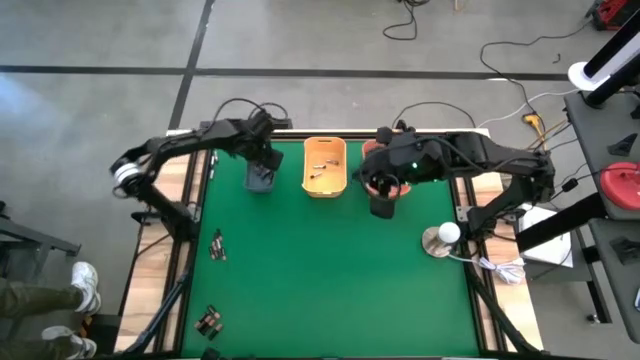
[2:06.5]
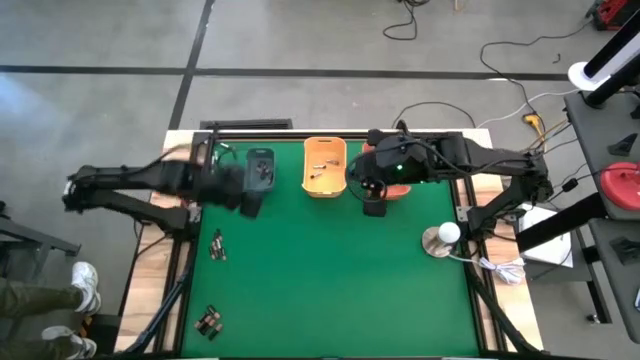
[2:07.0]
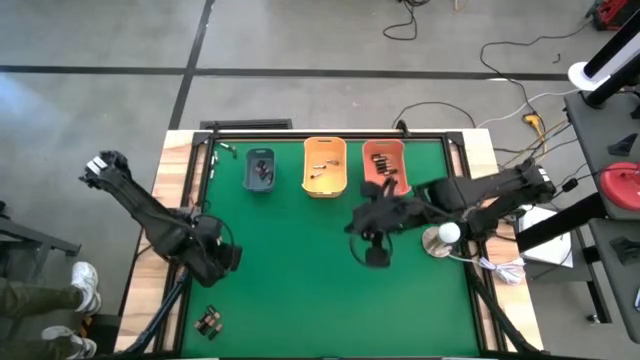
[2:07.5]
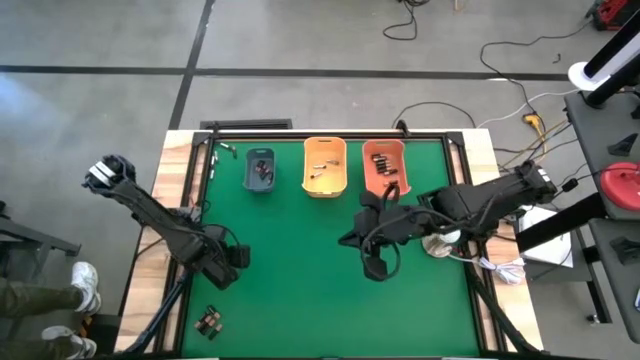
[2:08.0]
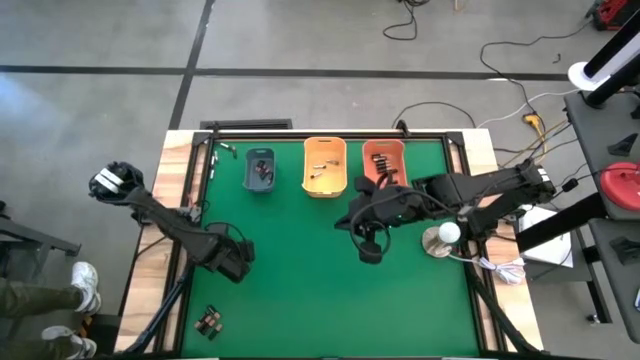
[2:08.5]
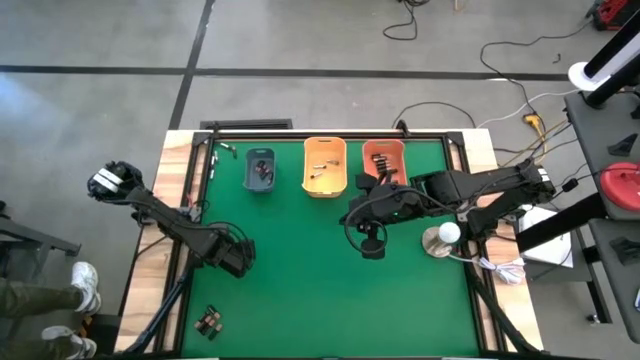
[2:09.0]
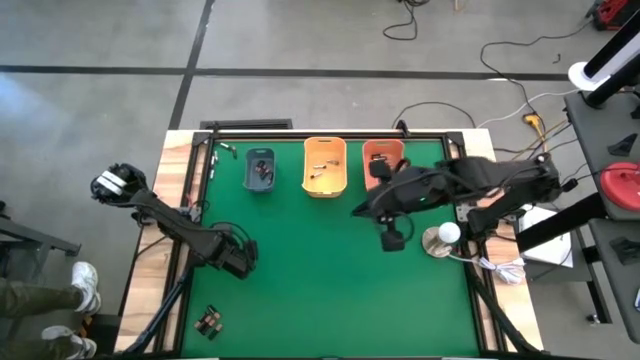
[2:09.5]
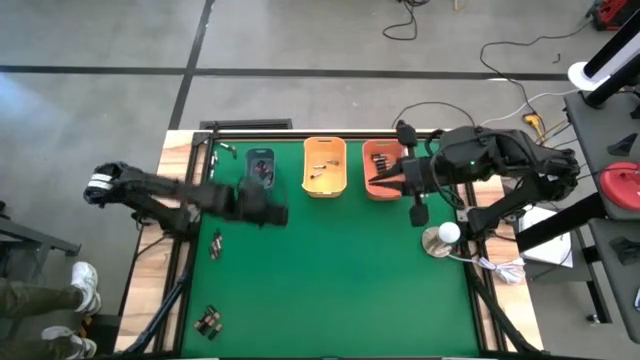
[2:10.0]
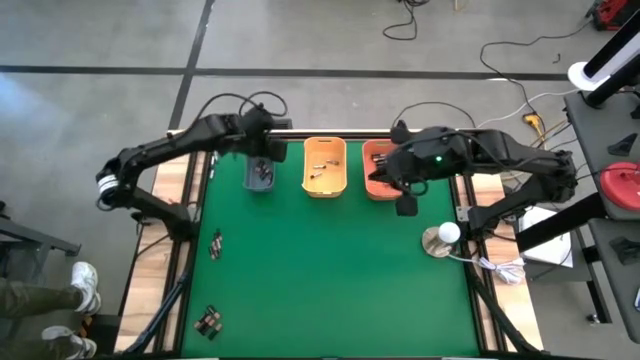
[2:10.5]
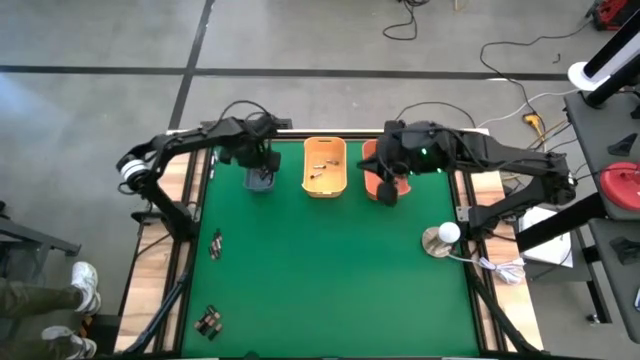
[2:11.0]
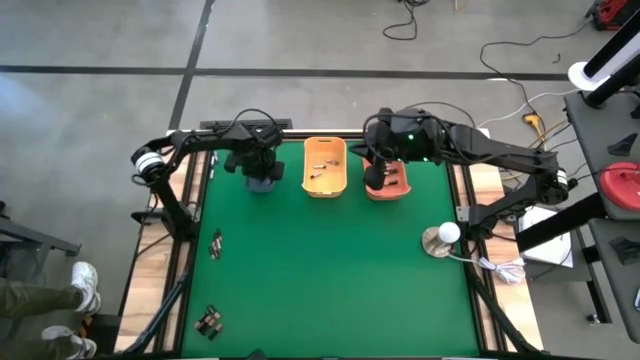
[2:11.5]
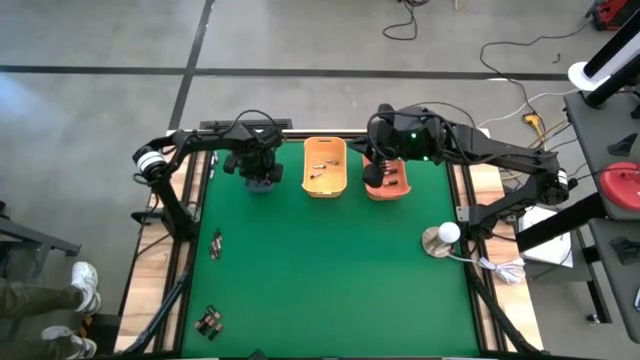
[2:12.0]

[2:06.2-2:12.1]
Task: Sort batteries
Put the black battery into the blue bin

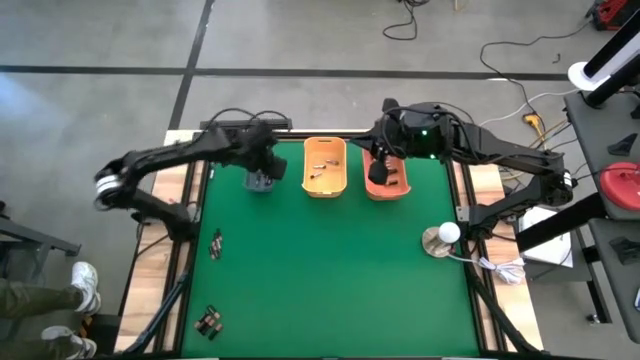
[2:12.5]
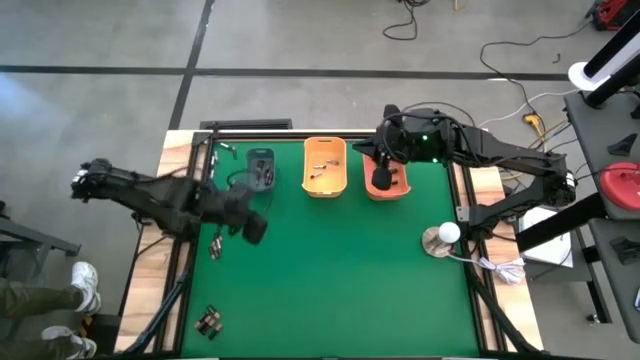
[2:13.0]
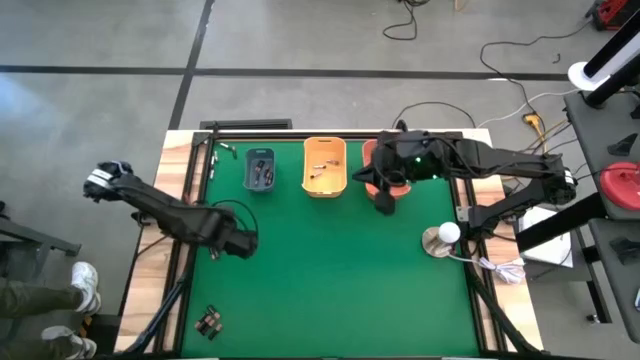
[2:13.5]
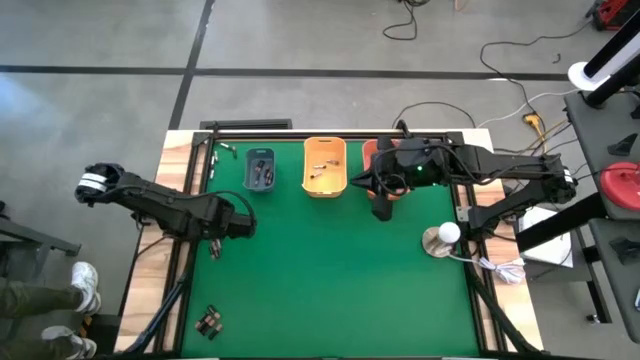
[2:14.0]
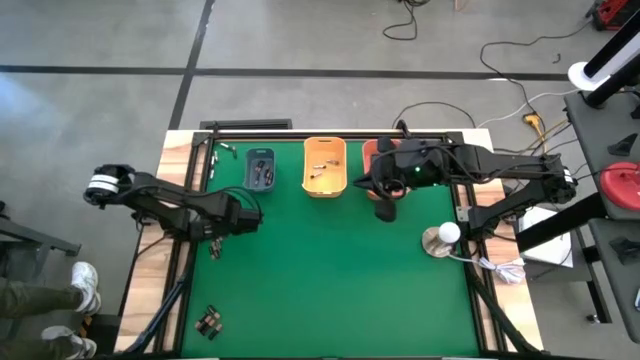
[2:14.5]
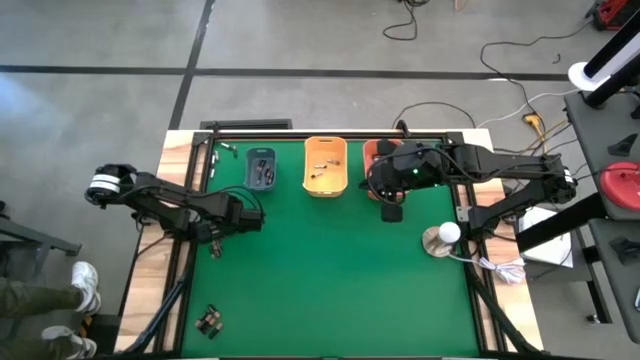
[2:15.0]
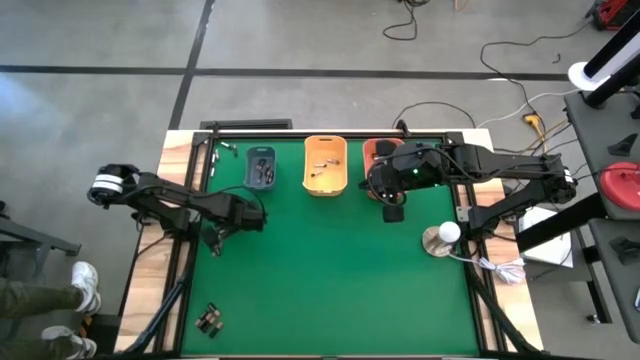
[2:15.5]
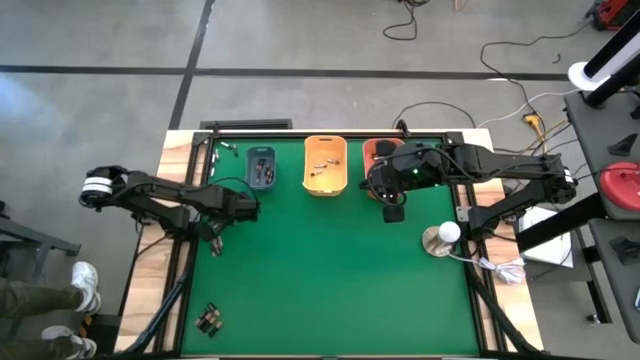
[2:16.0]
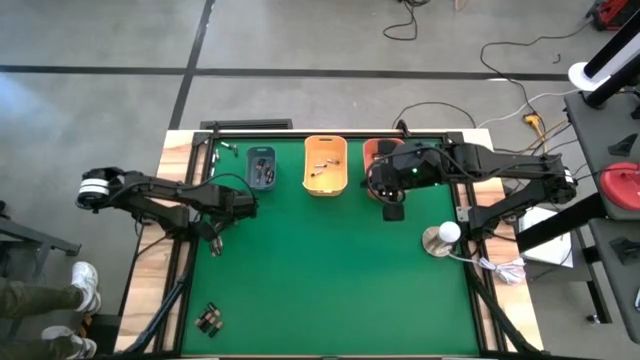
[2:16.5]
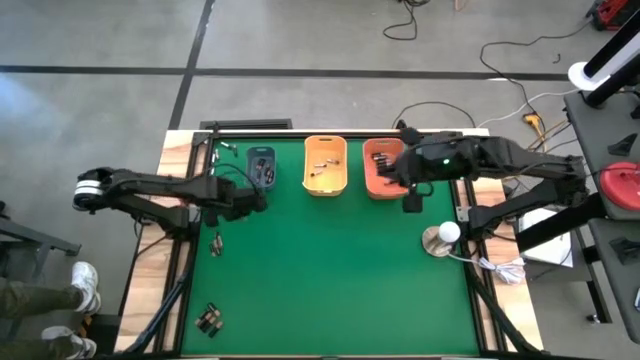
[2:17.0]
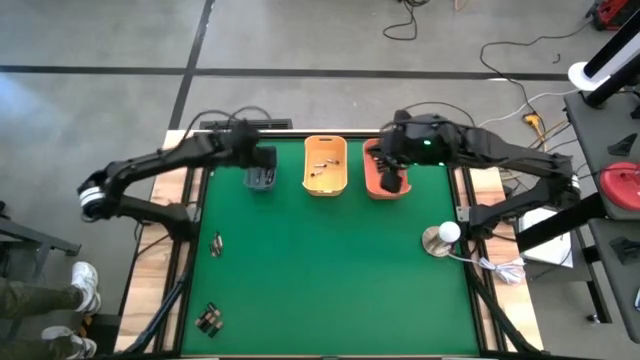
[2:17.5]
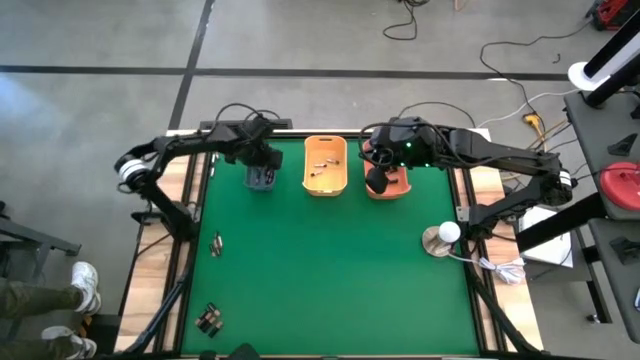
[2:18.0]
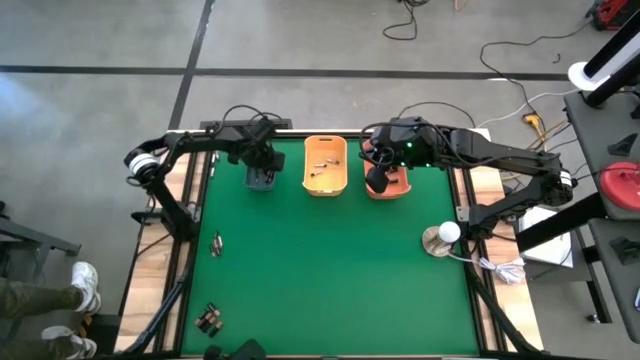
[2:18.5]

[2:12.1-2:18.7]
Put the black battery into the blue bin

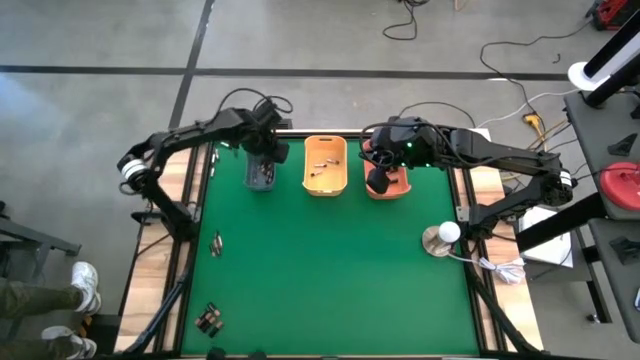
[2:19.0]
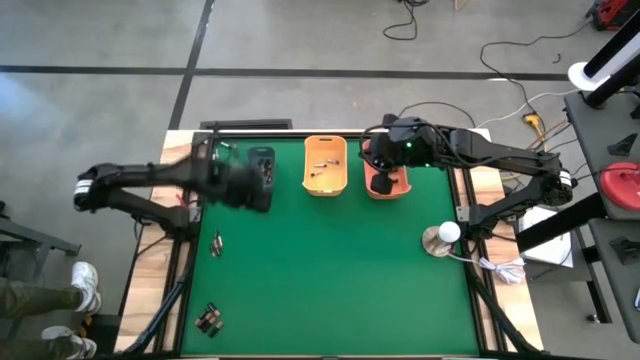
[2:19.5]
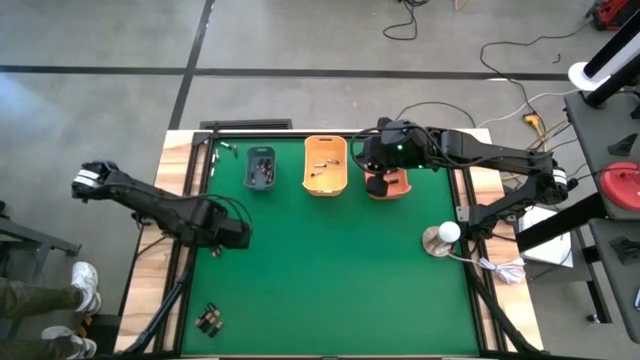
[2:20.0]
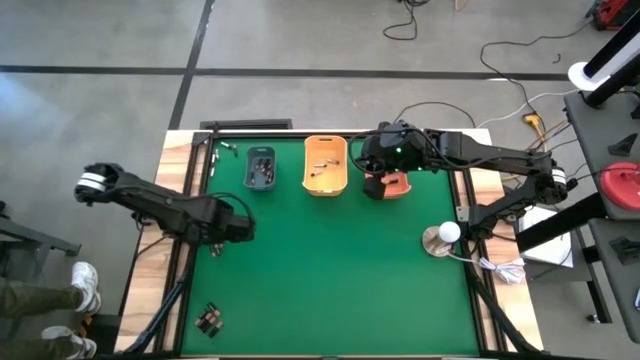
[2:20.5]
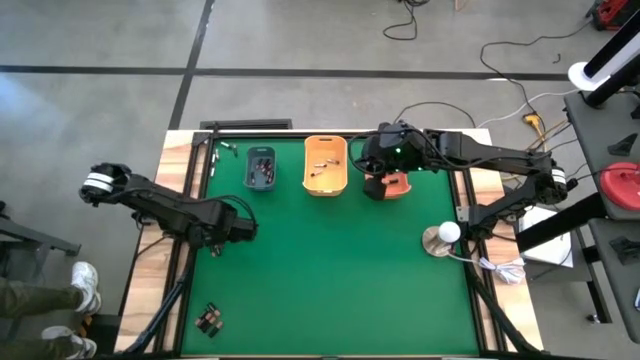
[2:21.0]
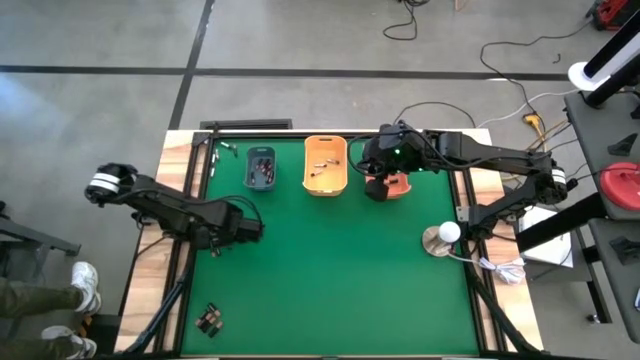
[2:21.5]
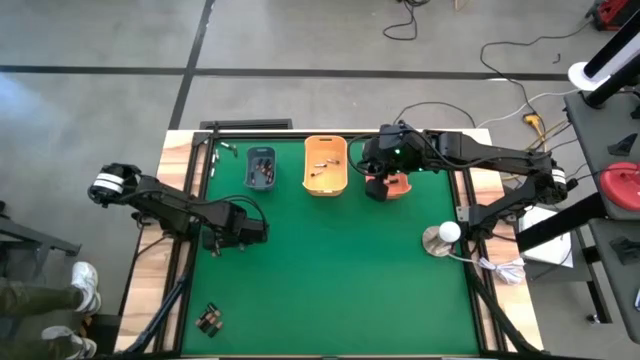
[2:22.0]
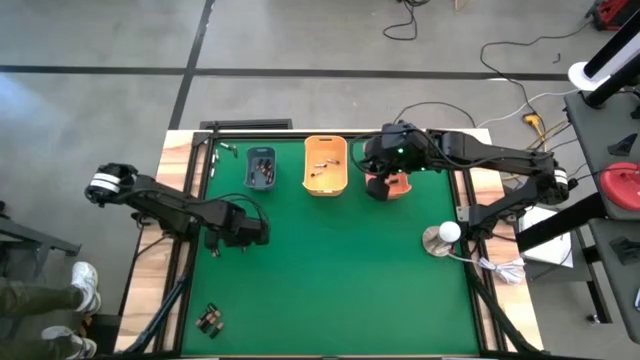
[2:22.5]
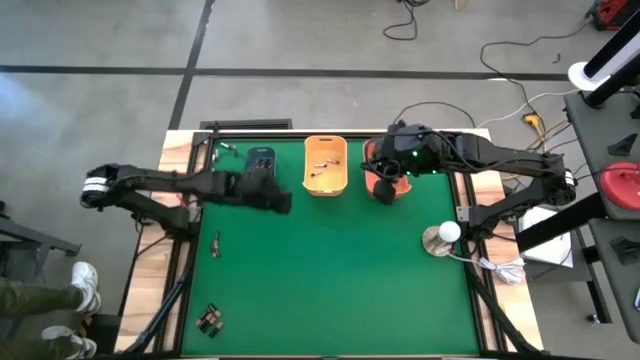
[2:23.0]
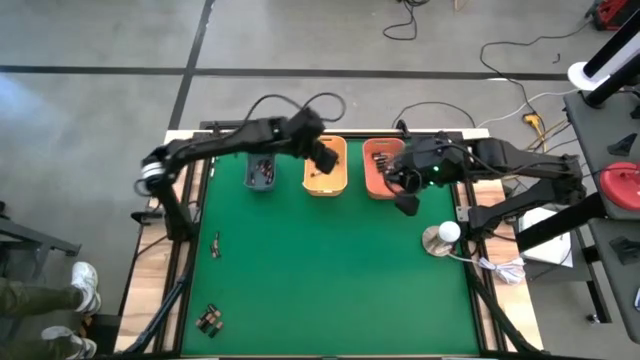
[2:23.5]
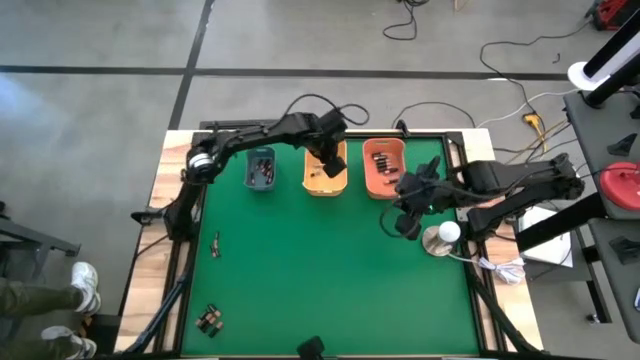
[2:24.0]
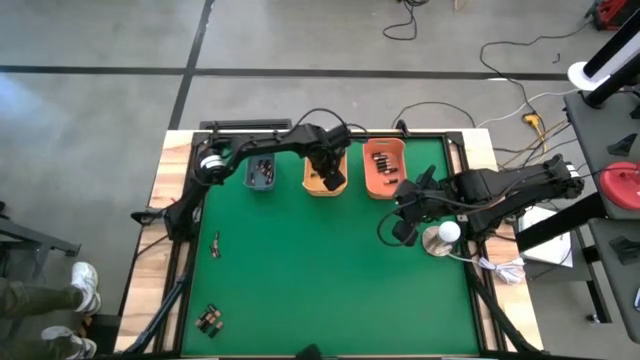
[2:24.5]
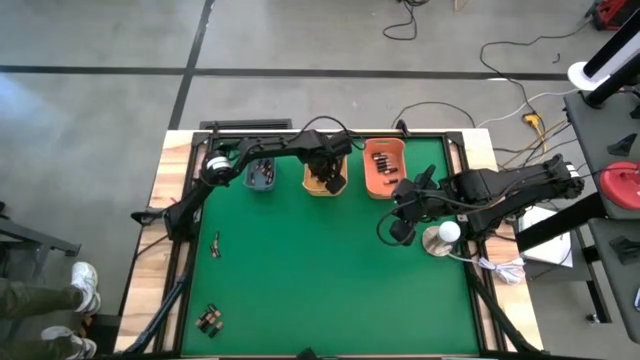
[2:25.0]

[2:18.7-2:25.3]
Put the black battery into the yellow bin

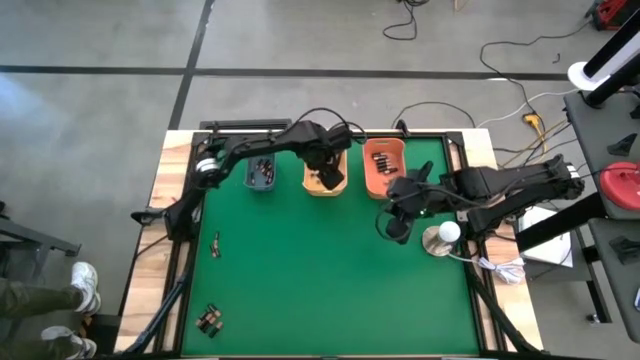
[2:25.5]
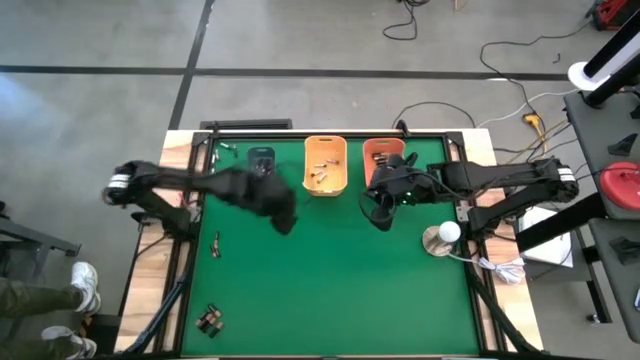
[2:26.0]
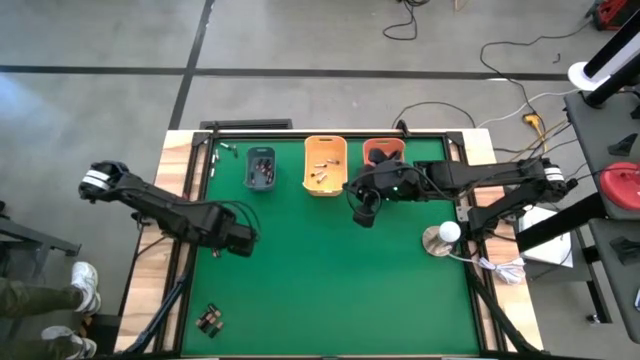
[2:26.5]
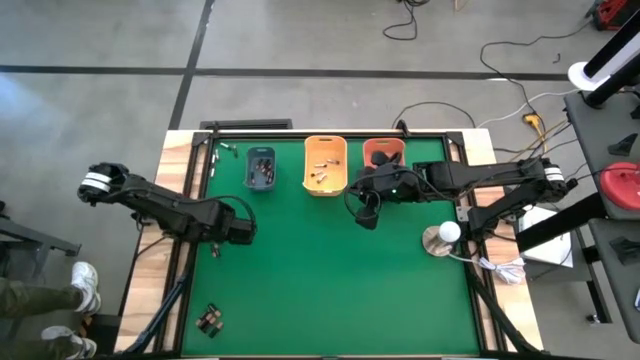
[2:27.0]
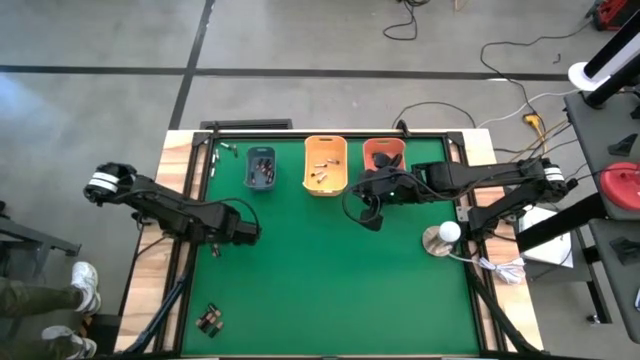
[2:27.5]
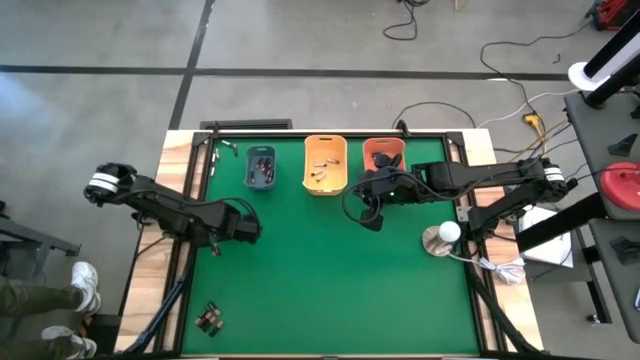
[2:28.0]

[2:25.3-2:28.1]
Put the black battery into the blue bin
